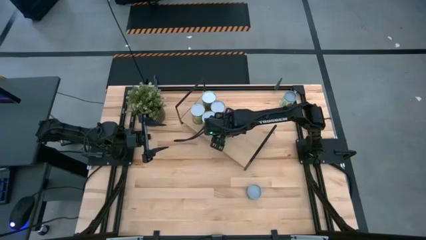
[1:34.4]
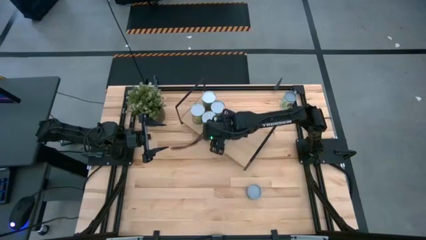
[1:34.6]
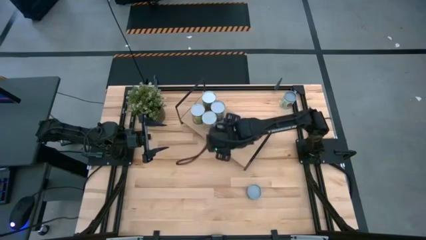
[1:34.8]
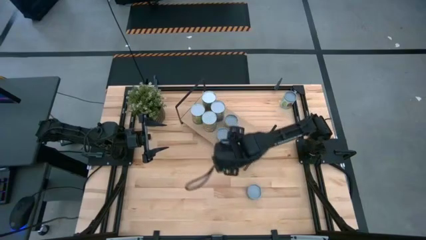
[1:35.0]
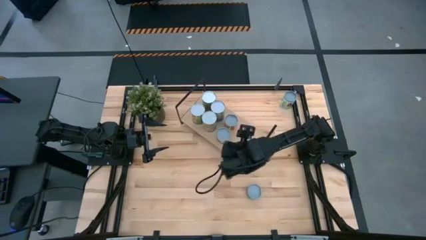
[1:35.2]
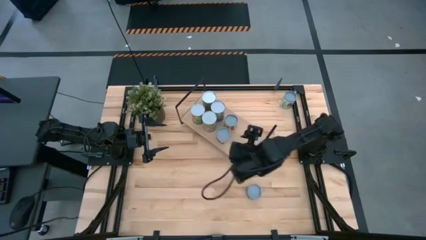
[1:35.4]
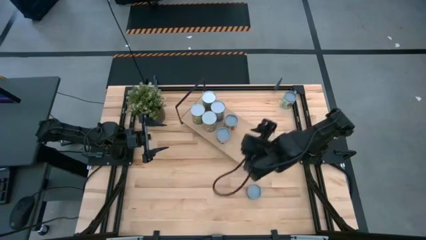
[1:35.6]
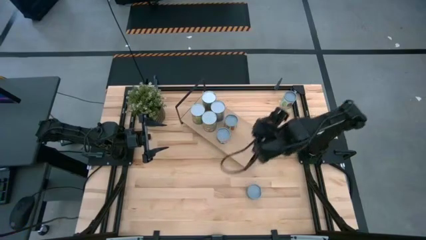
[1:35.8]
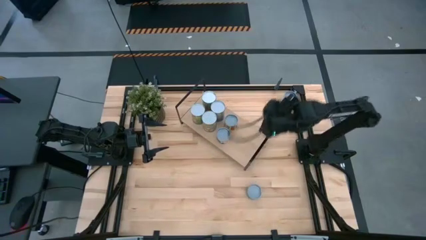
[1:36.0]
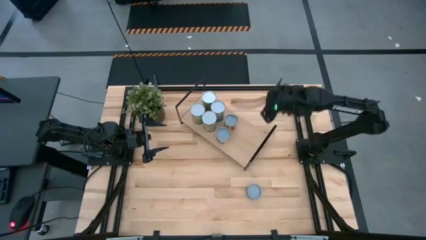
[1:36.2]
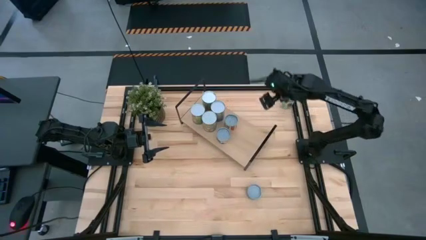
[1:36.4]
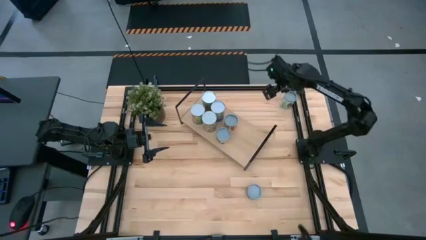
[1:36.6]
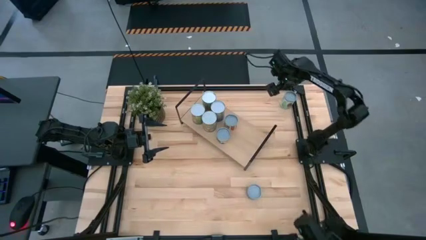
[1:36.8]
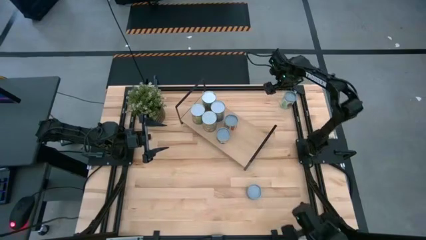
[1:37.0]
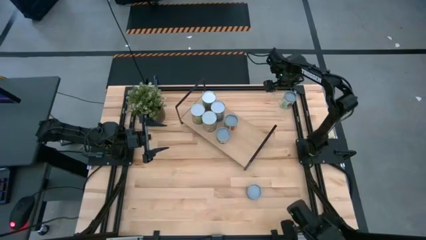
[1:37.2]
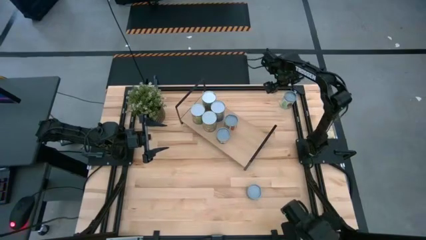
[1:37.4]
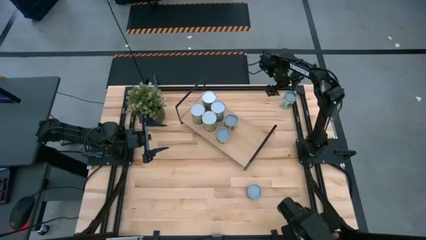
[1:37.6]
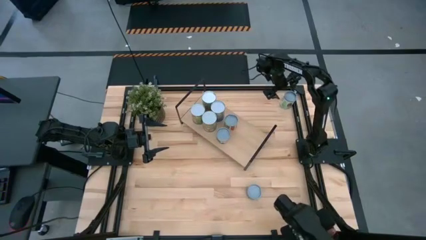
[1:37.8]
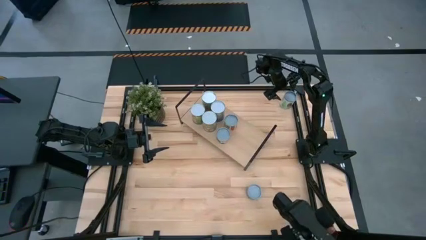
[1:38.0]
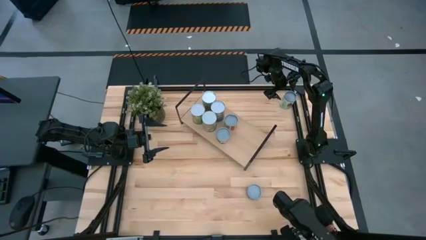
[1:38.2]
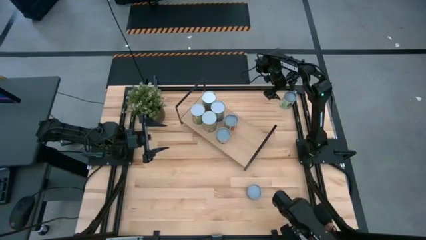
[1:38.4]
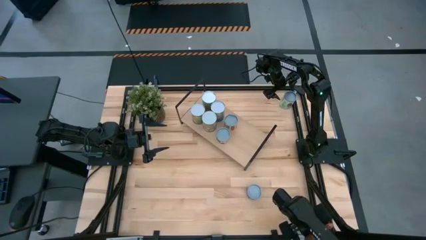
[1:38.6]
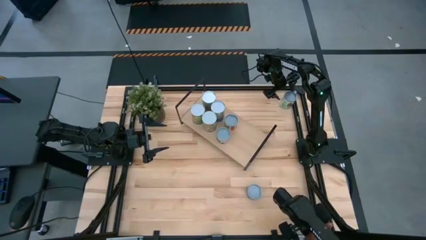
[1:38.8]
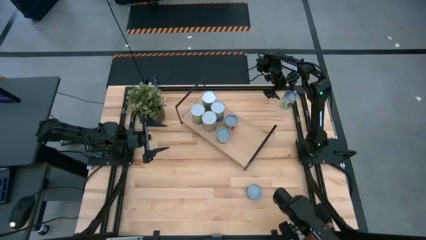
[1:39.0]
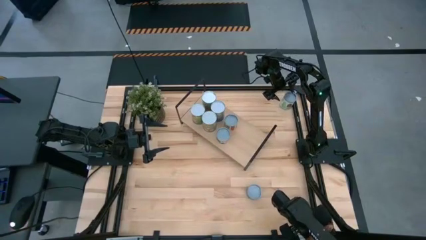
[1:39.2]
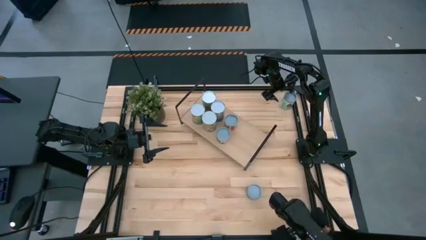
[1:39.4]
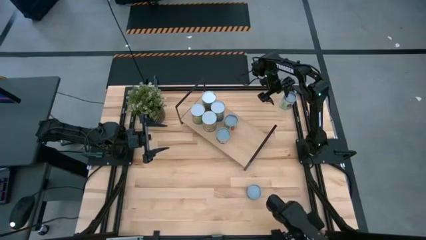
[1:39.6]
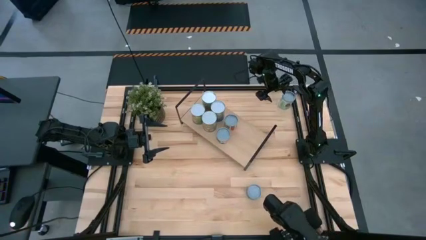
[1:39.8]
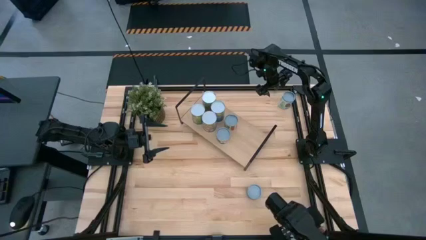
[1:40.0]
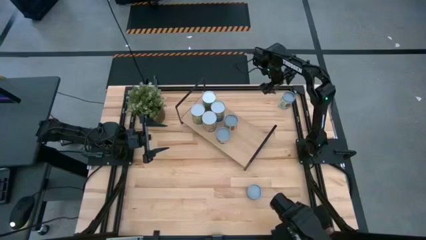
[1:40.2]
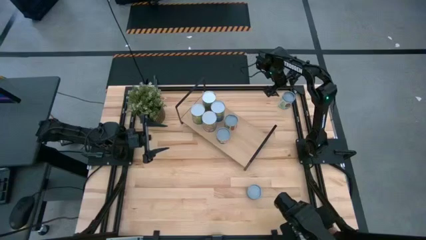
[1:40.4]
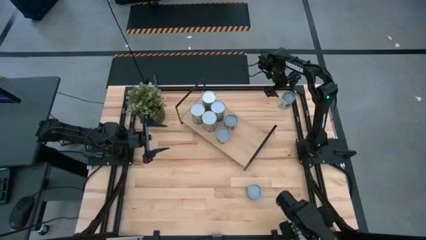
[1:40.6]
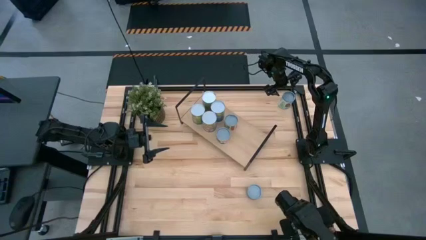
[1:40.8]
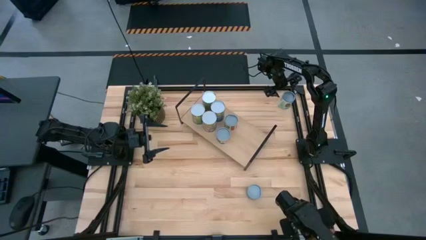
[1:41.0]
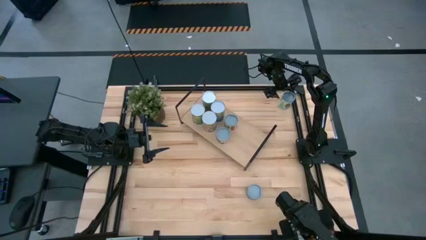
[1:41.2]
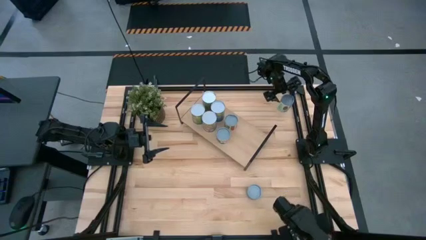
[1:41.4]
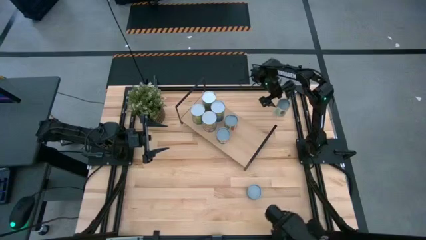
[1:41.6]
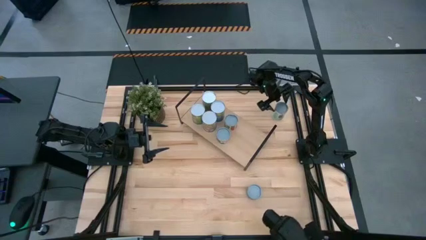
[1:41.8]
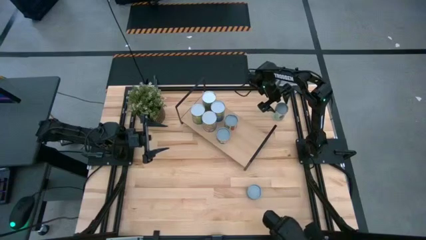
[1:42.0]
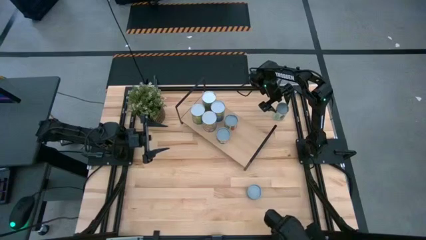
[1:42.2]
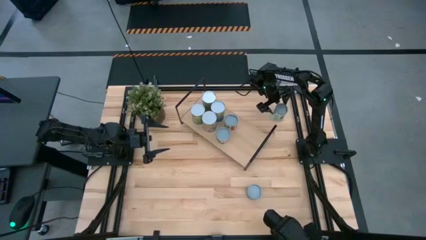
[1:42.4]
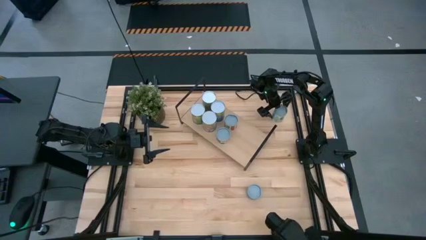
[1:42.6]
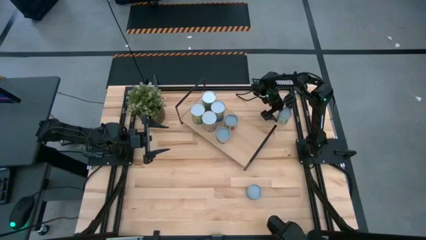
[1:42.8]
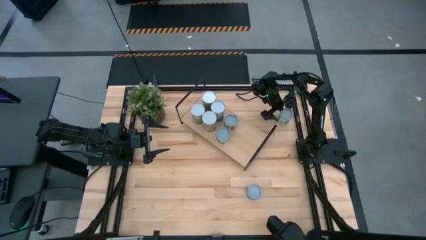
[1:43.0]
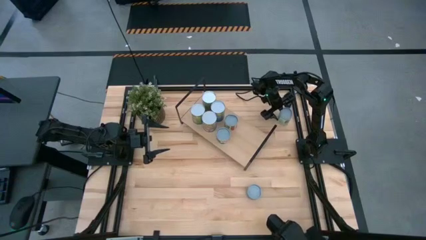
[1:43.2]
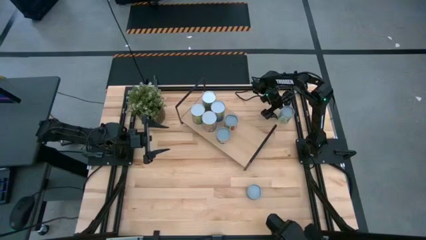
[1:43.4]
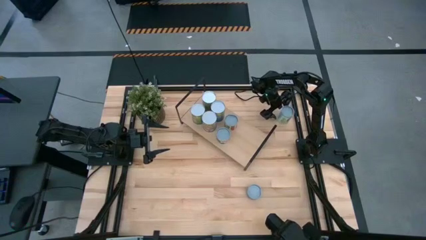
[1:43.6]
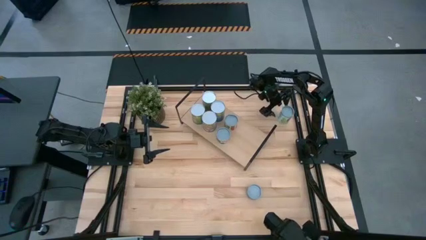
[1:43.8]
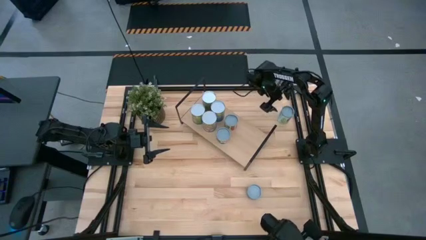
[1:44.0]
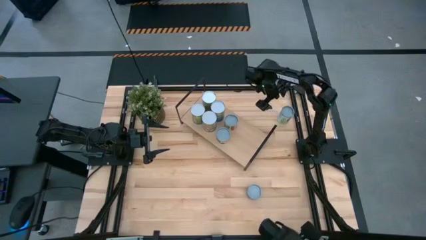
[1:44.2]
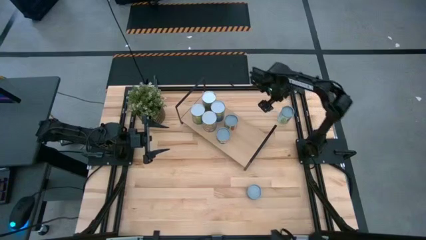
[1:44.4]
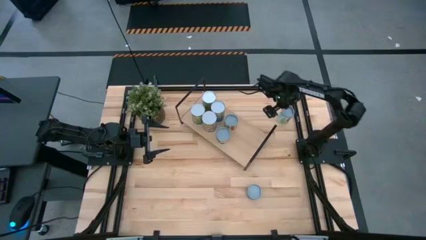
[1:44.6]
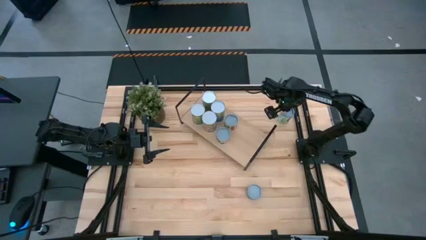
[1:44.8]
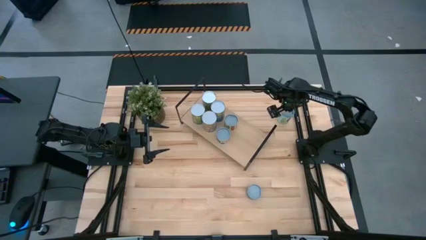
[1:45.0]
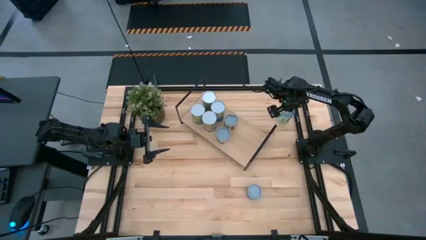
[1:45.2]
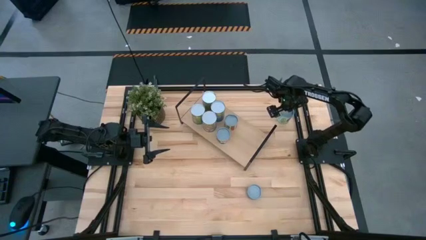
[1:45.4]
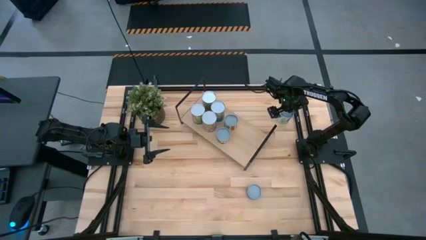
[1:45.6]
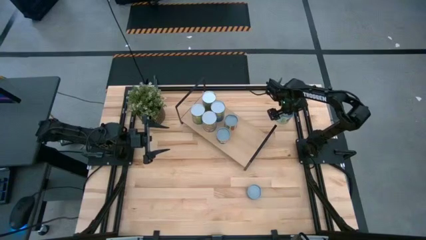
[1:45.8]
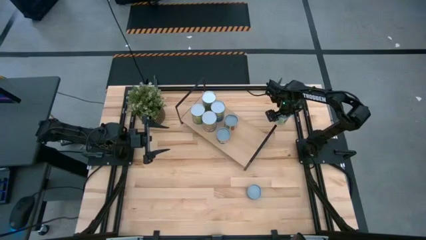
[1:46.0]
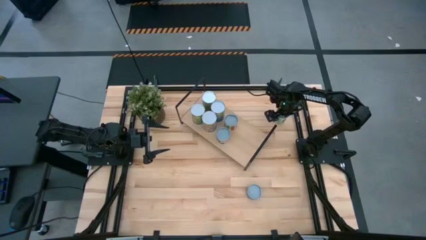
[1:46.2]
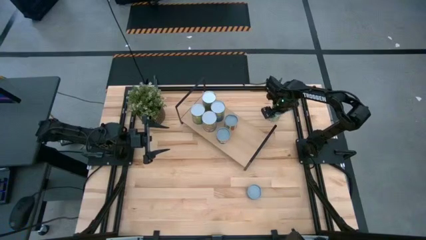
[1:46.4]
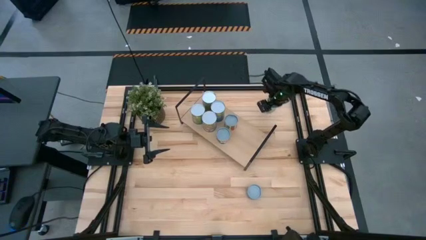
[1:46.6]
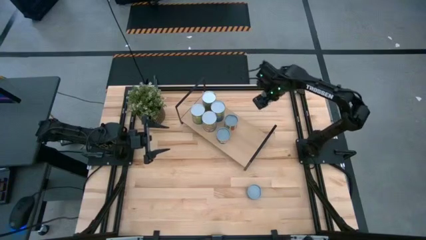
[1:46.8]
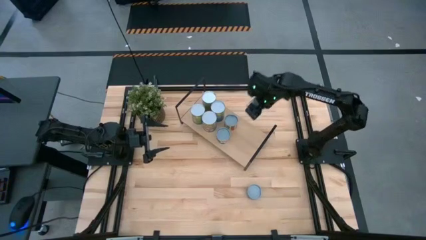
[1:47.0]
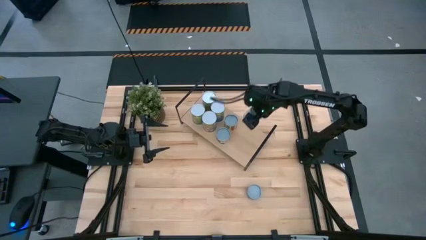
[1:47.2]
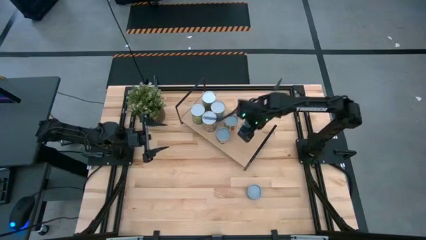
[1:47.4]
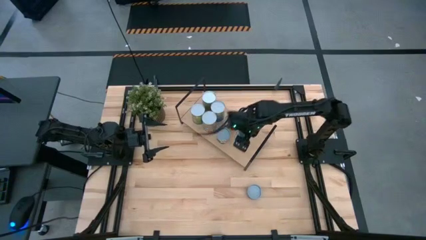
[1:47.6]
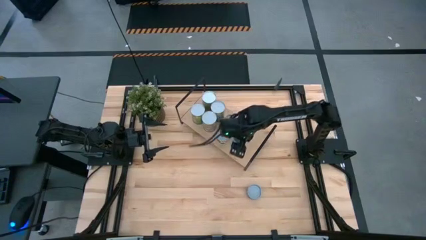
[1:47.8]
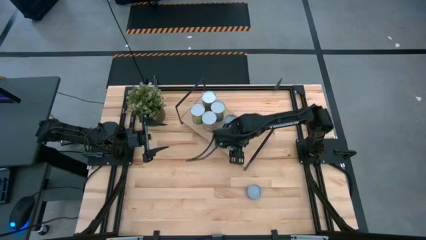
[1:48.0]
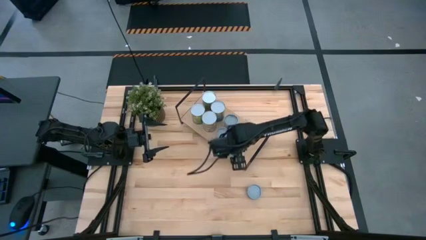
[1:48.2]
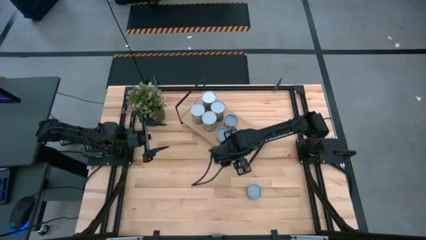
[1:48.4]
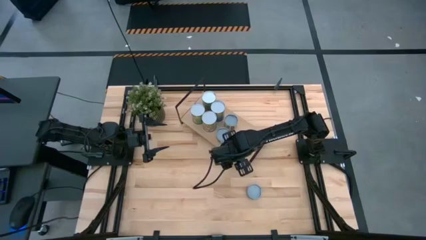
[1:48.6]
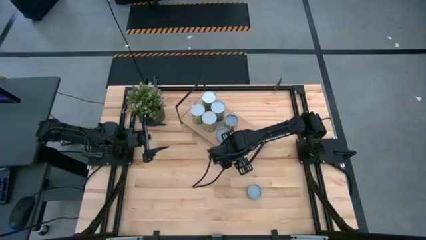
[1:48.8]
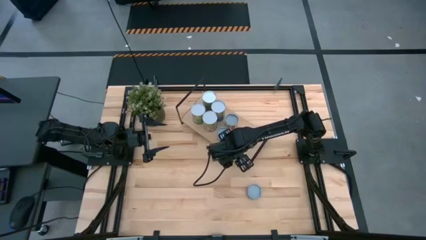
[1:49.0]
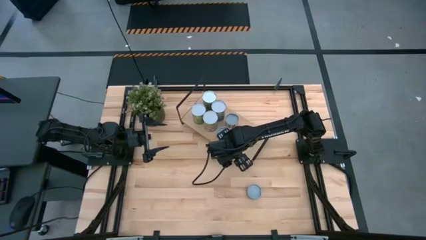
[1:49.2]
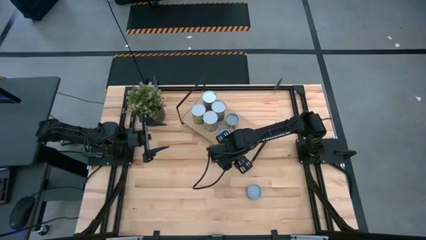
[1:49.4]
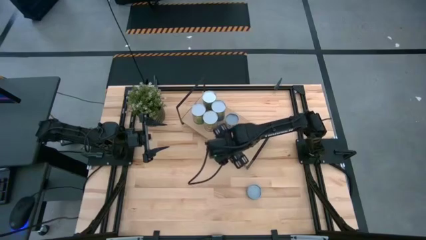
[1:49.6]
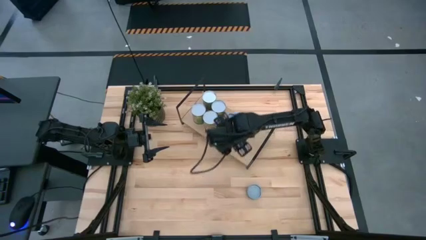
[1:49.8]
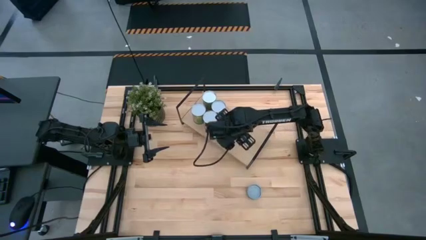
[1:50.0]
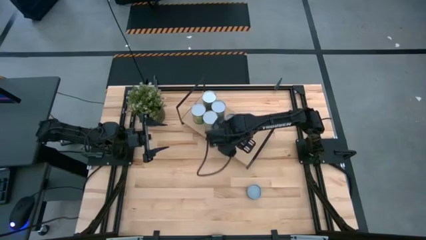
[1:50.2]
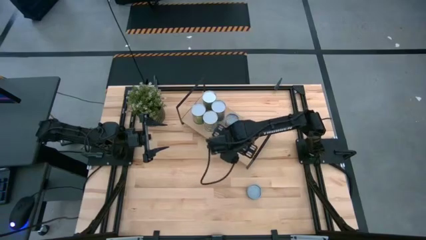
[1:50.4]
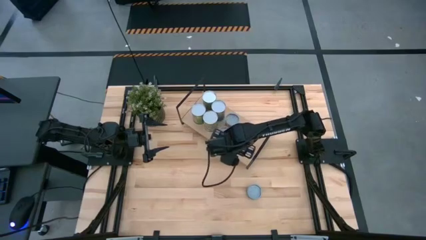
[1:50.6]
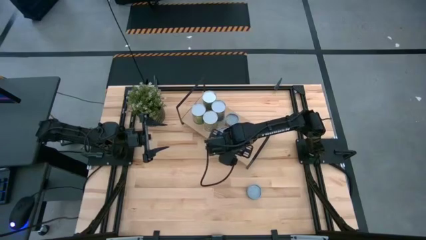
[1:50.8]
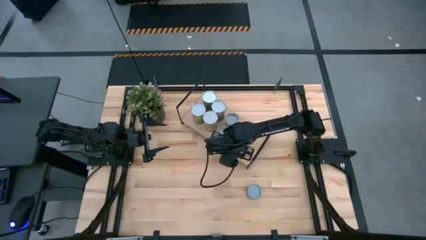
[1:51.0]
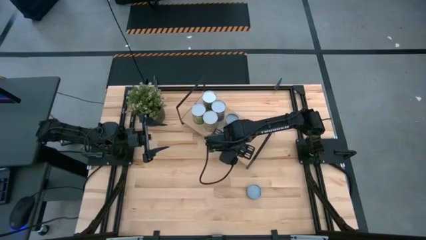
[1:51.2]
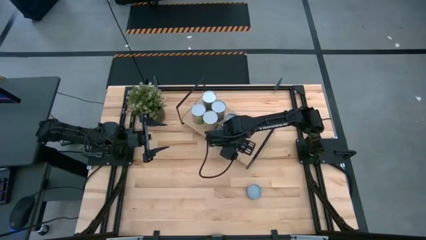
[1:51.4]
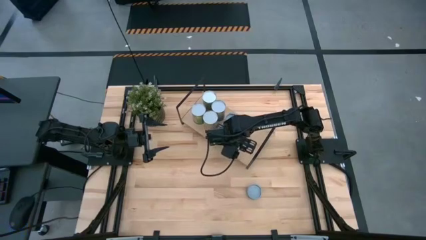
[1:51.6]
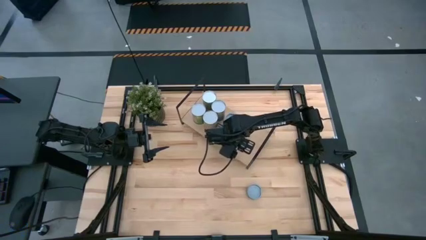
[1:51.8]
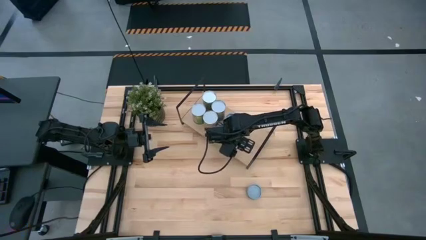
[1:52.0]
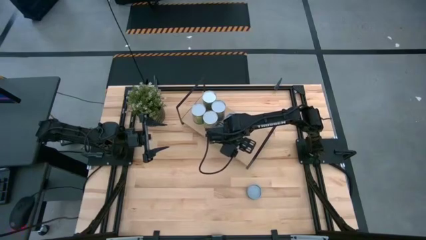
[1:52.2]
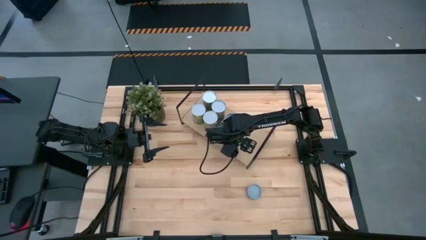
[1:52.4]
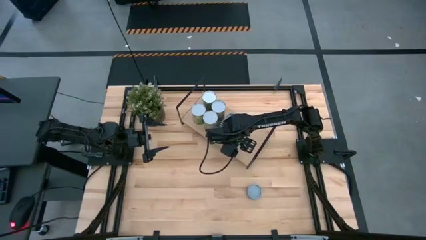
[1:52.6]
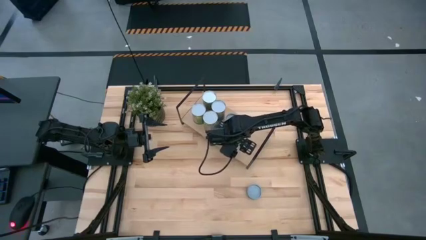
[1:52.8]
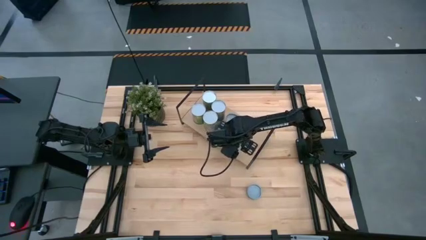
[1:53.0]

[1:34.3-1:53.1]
Task: Pick and place cans onto a shelf
Put the canned mixed vegetables on the shelf
